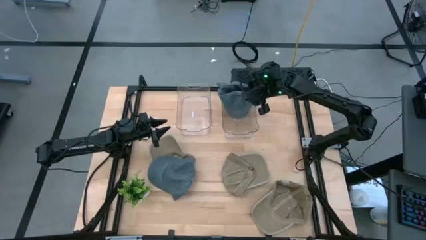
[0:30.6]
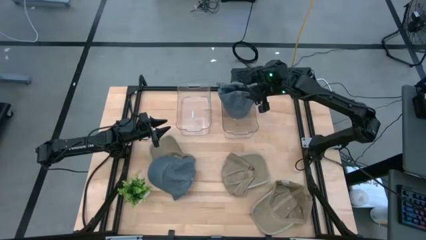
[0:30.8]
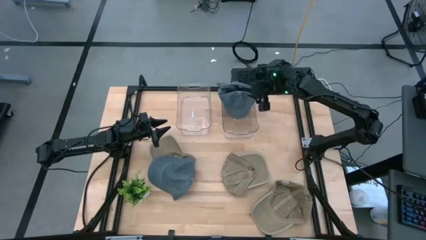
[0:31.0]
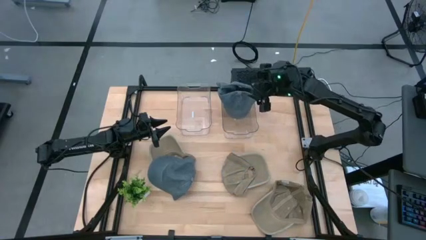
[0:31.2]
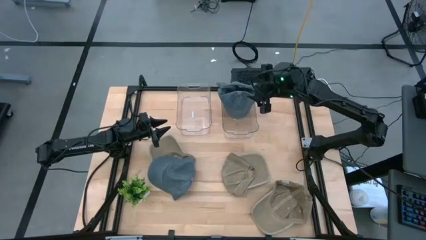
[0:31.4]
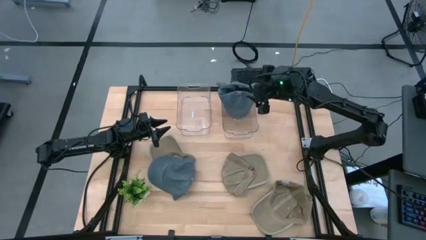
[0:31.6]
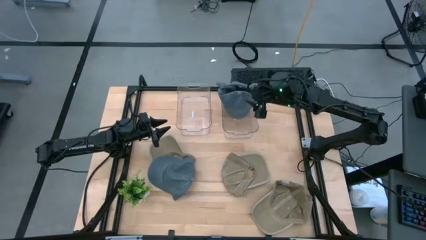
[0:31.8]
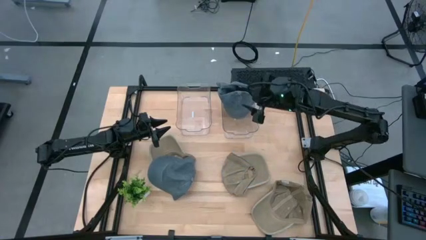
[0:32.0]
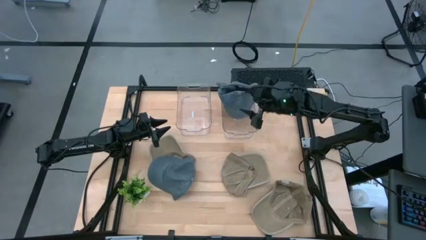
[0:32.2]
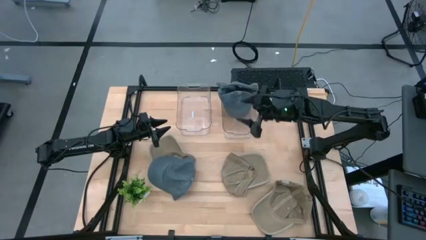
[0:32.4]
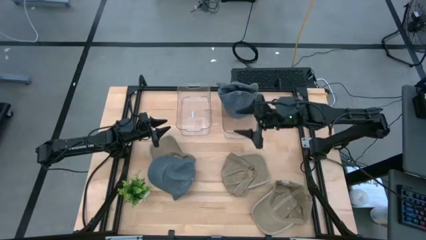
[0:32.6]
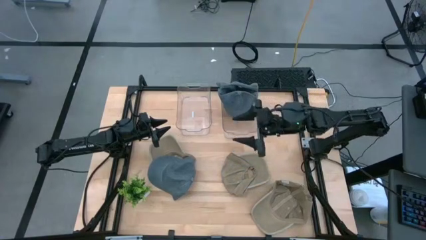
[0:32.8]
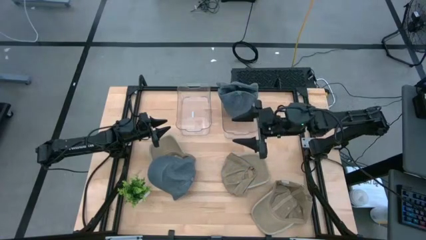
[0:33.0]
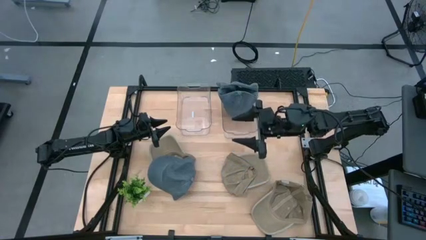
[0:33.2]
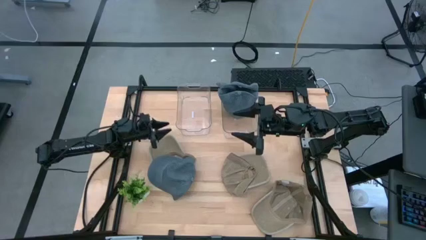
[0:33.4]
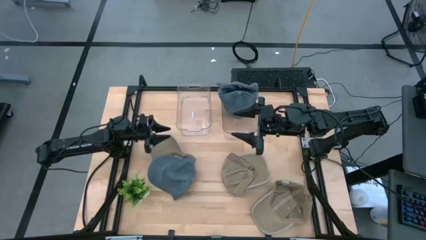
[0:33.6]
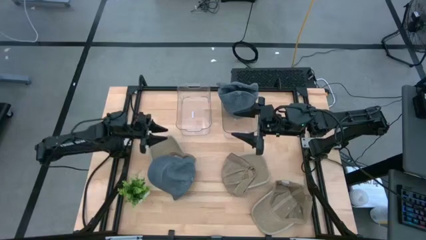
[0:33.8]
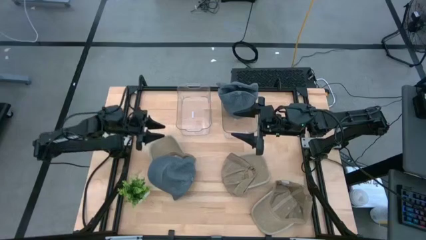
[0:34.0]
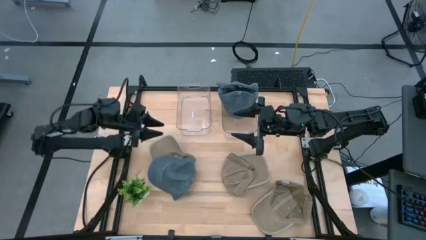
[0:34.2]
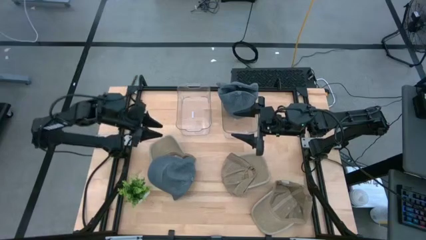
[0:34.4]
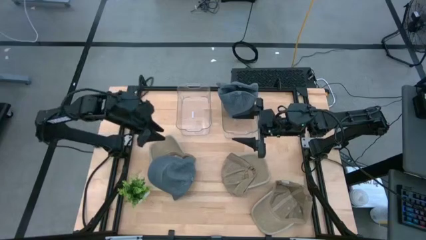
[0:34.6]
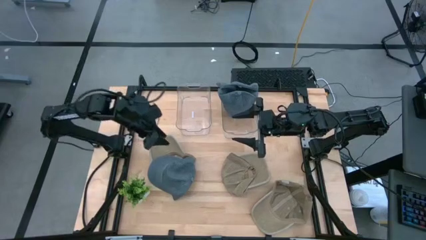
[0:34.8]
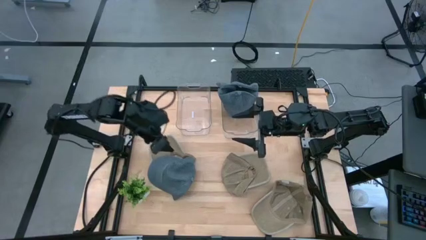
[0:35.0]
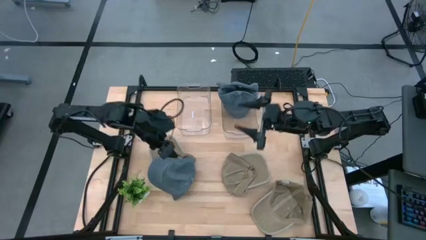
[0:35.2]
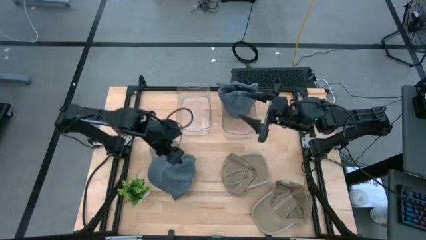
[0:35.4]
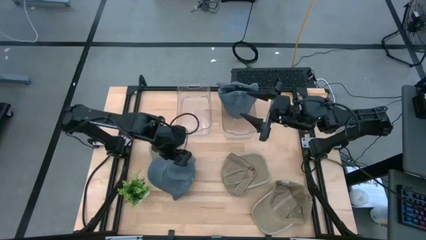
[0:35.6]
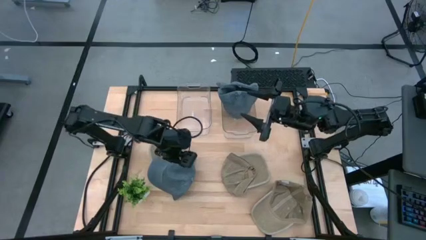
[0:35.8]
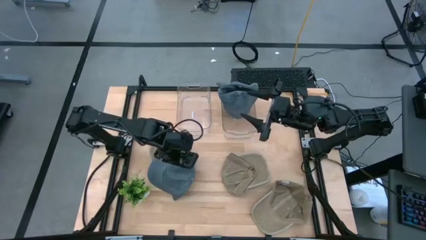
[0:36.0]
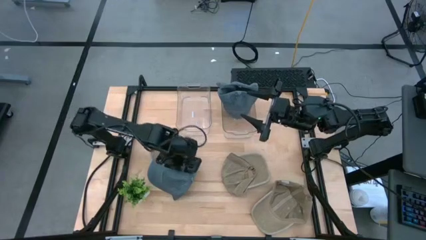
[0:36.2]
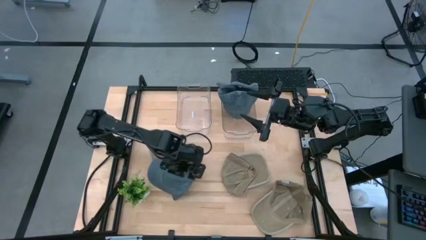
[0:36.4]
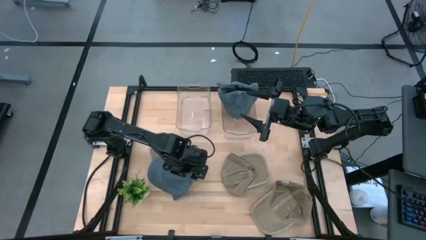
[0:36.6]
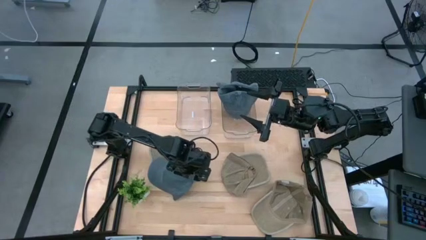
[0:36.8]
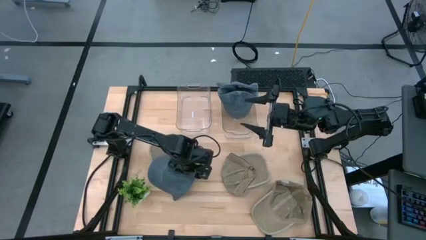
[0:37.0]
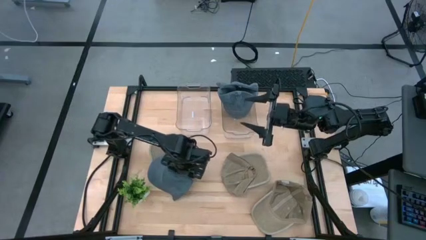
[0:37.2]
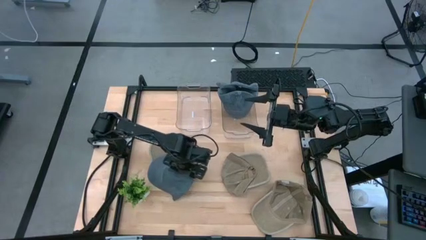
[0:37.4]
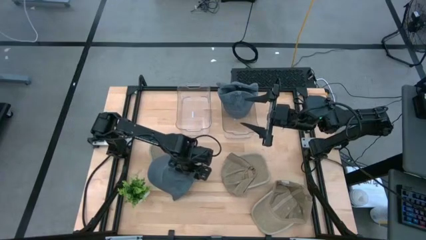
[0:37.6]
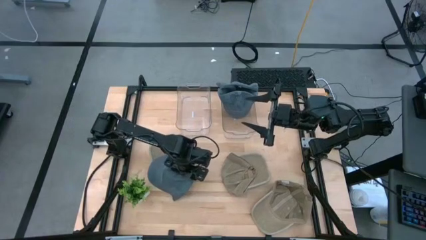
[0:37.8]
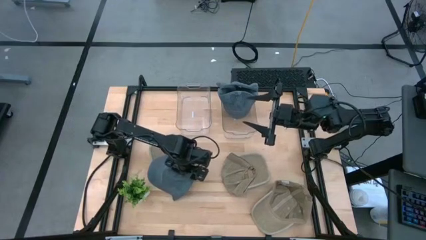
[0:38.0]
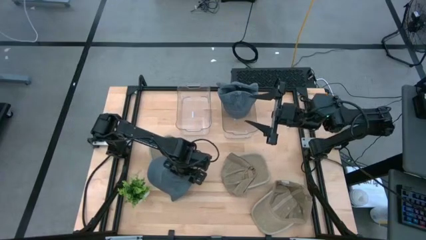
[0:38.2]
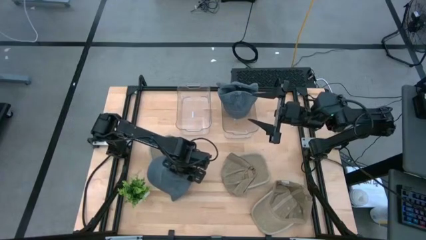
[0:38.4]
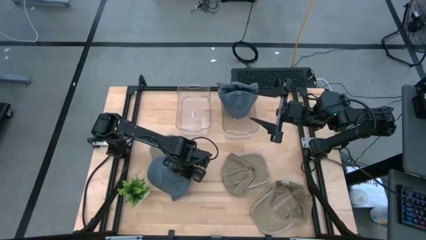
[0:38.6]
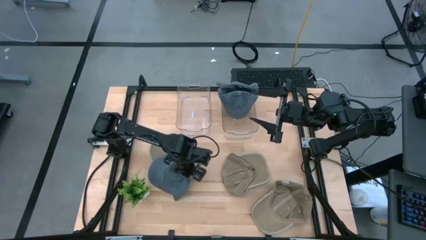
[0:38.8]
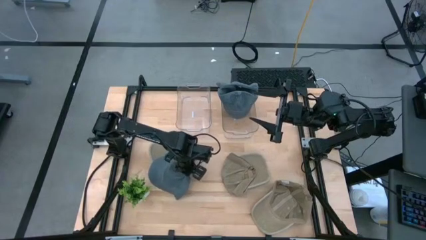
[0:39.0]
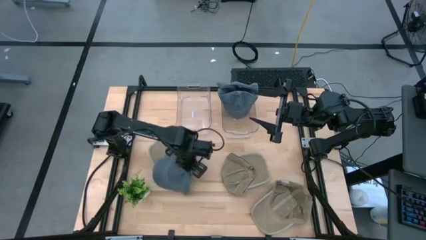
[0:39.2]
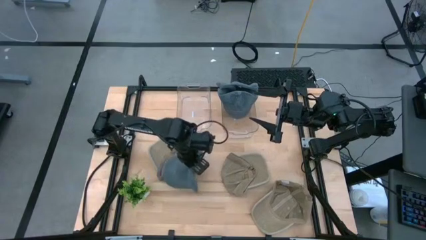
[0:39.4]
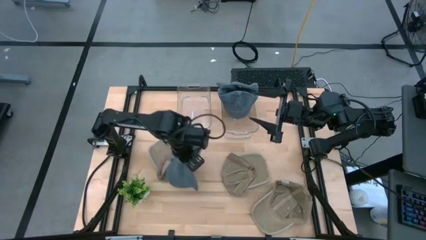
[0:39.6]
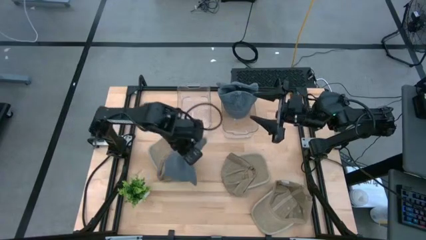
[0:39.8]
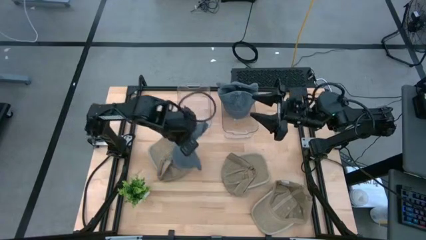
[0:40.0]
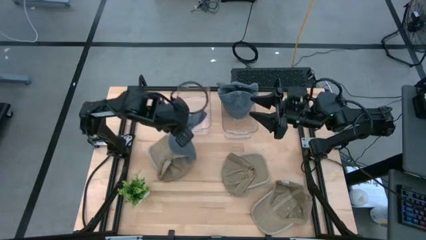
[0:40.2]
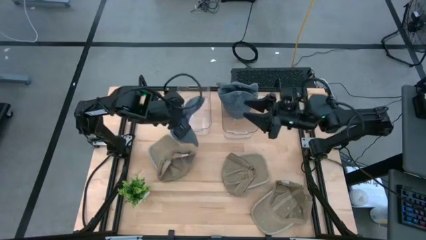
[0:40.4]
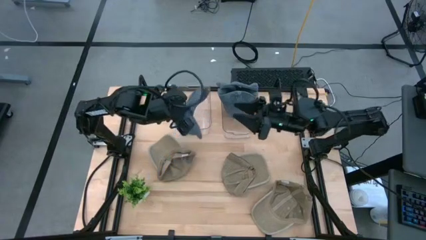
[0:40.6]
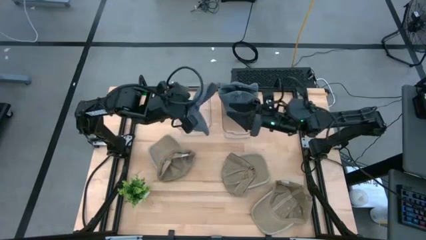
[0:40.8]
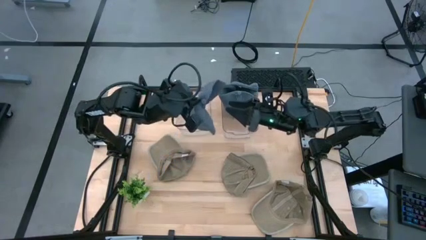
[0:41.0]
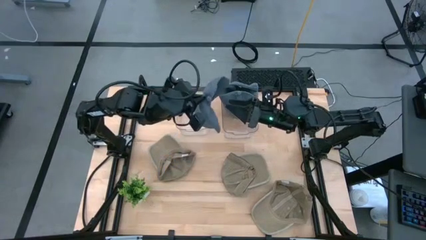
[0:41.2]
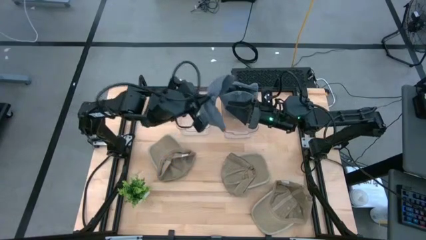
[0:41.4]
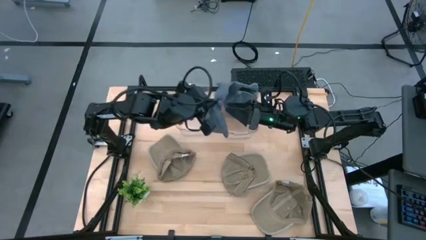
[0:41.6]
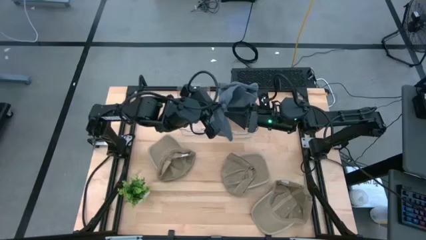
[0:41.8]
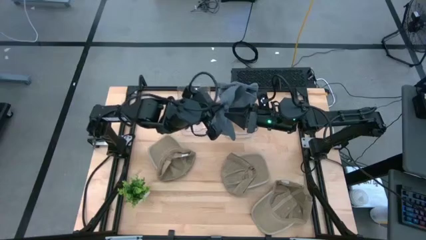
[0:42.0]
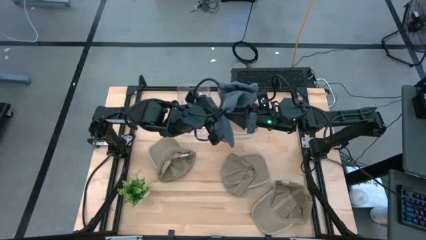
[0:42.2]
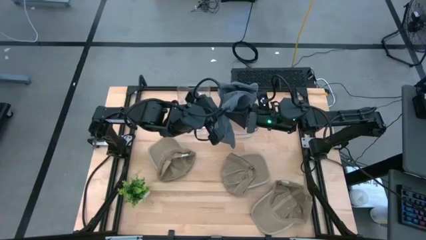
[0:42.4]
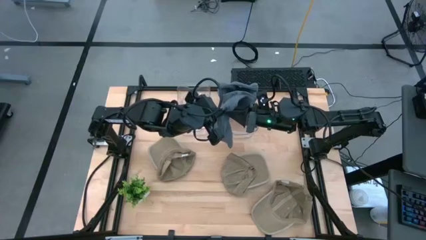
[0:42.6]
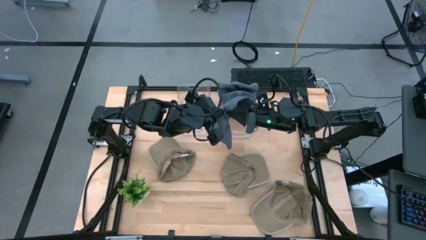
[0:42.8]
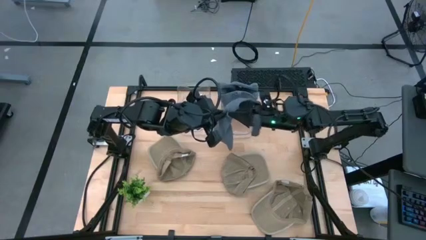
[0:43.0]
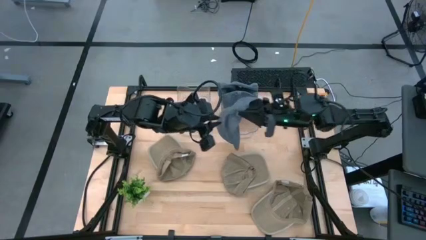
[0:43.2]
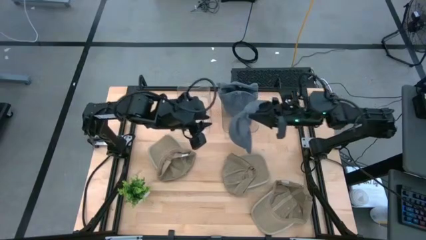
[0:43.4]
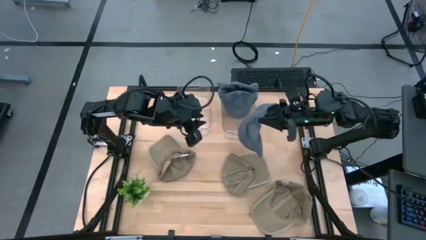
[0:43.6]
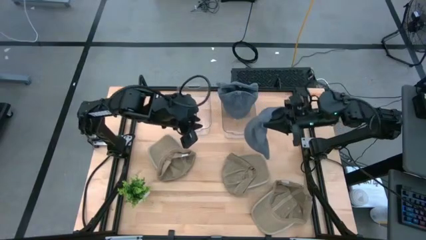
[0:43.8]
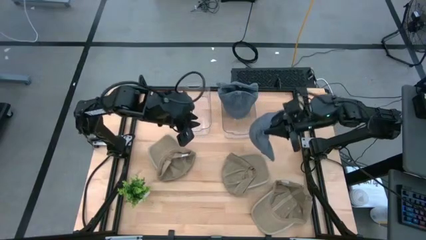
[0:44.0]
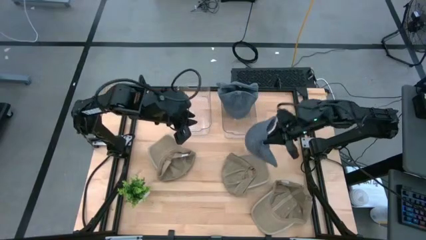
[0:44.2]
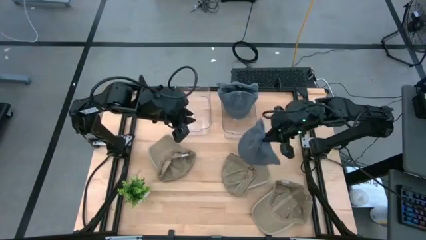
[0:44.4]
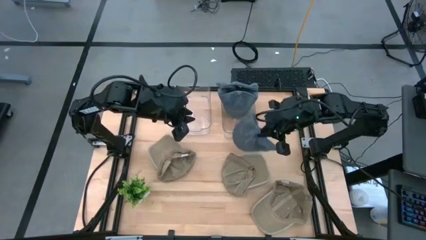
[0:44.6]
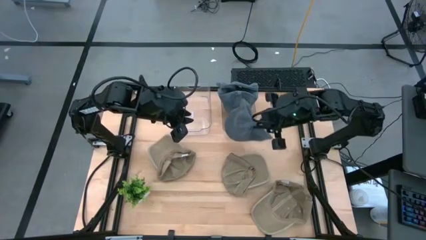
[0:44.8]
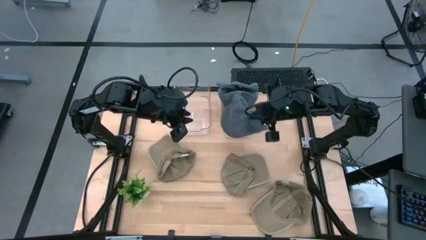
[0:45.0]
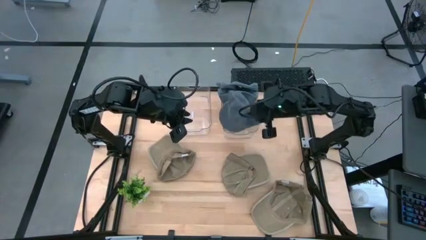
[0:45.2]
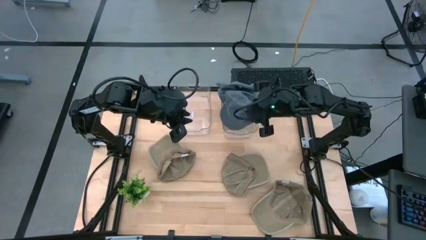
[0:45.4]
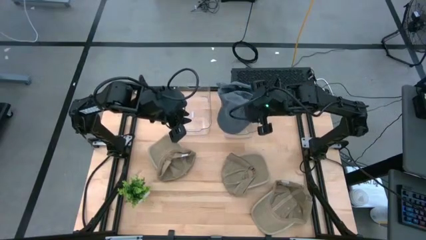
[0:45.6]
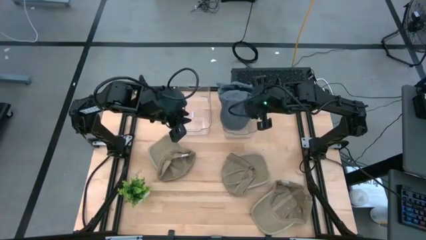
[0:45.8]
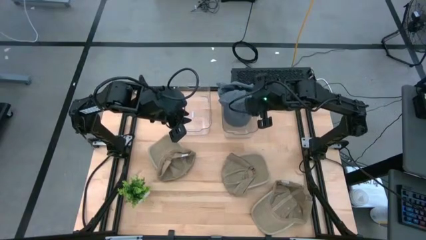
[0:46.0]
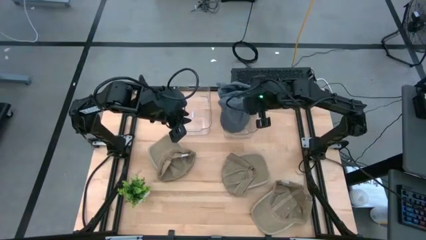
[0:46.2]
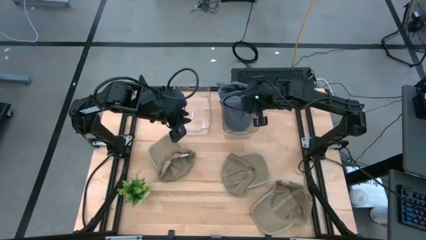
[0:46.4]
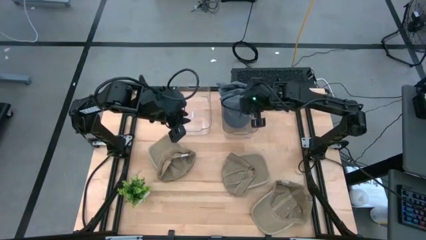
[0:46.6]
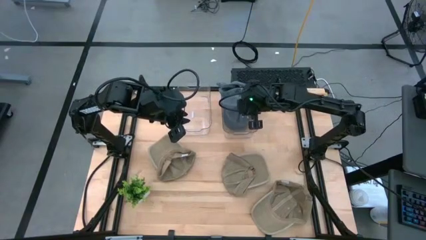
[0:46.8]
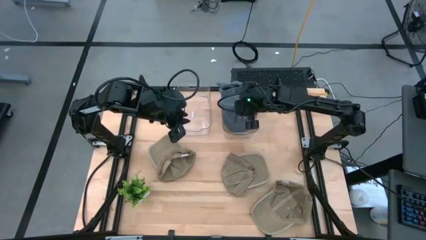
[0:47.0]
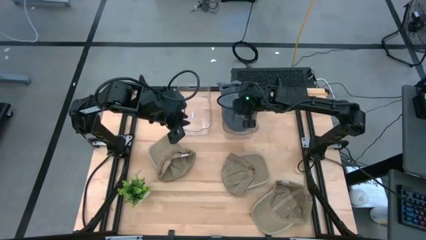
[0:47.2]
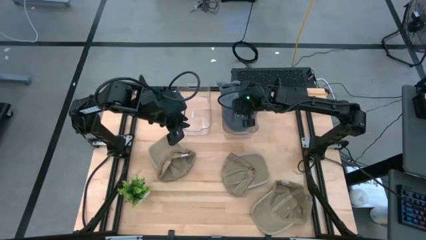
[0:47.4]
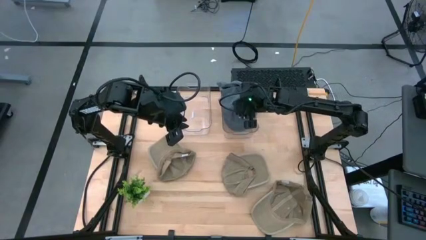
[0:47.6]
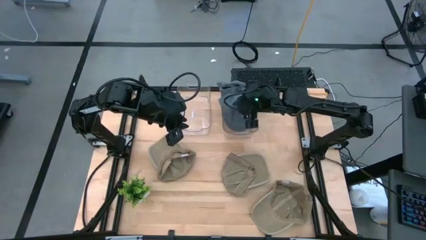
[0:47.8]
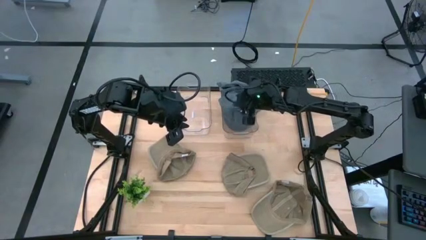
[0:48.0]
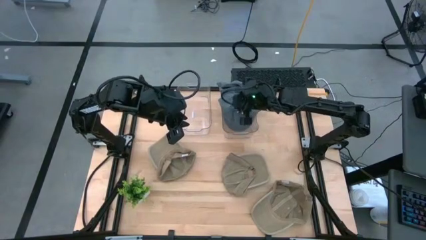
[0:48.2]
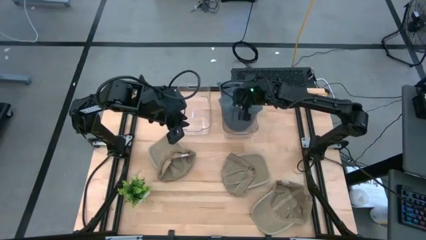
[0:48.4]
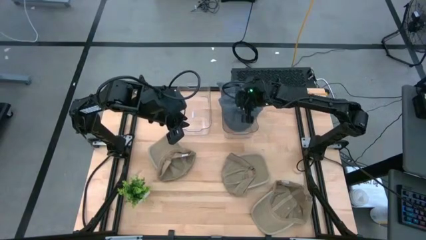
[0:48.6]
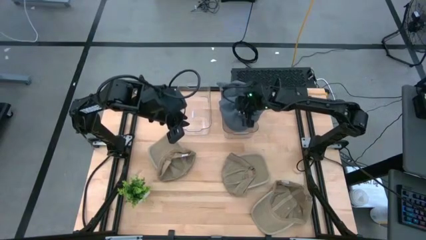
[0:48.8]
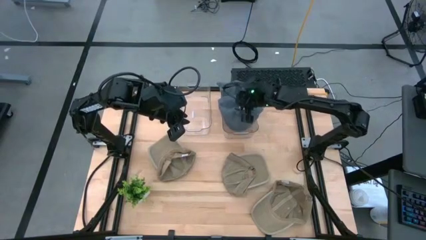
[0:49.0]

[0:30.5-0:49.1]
Task: Pick & Place hat
Put the blue cap into the right transparent bin
